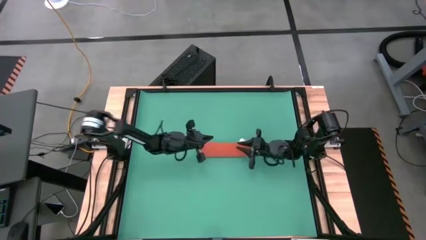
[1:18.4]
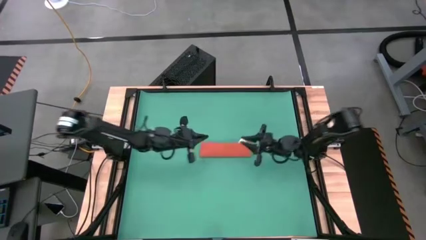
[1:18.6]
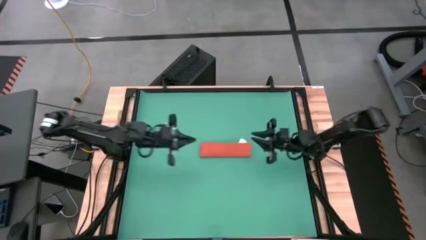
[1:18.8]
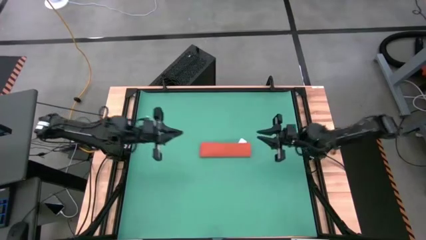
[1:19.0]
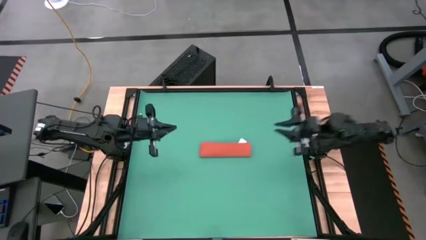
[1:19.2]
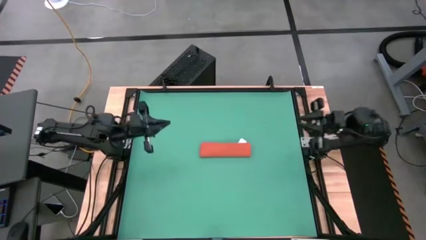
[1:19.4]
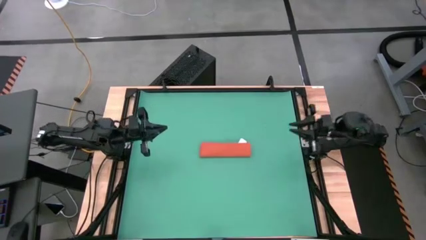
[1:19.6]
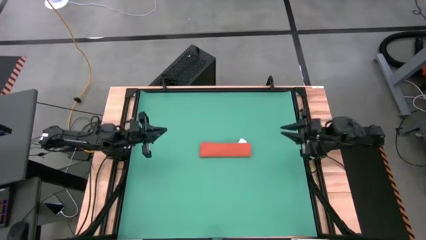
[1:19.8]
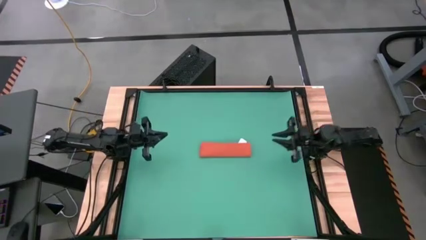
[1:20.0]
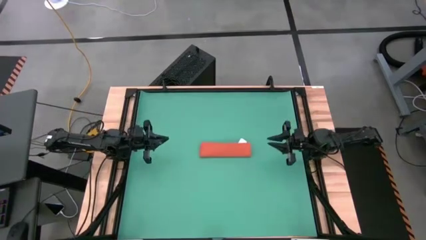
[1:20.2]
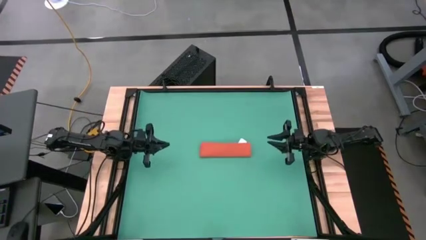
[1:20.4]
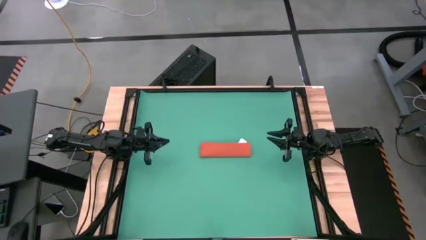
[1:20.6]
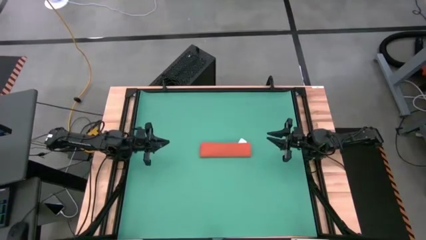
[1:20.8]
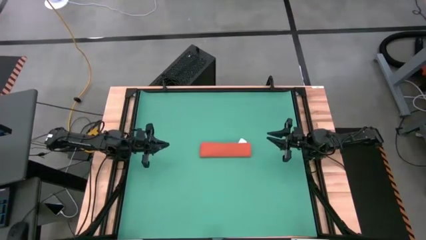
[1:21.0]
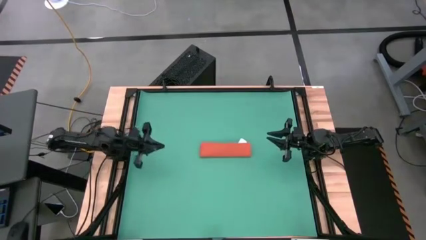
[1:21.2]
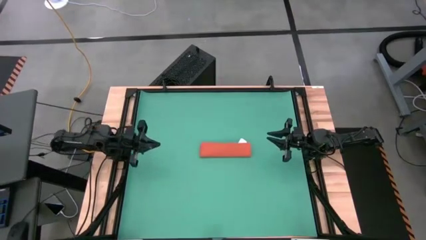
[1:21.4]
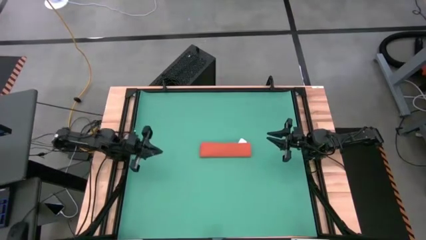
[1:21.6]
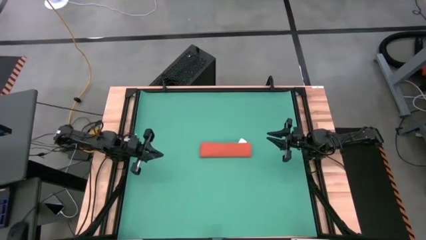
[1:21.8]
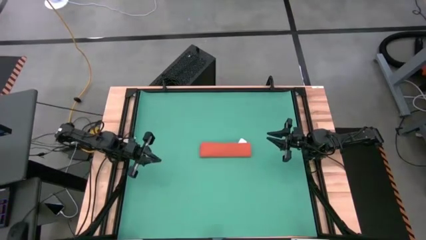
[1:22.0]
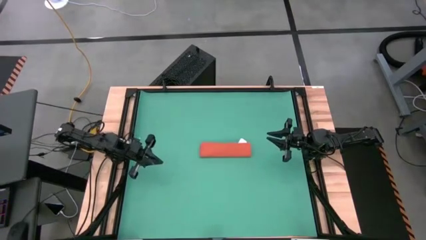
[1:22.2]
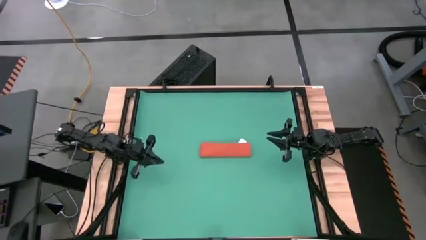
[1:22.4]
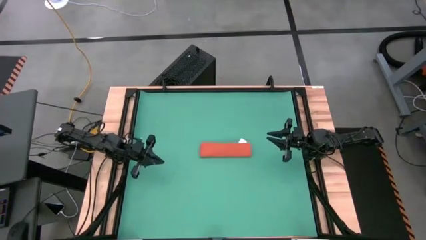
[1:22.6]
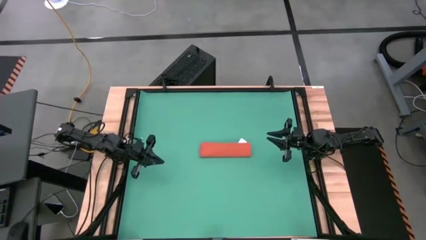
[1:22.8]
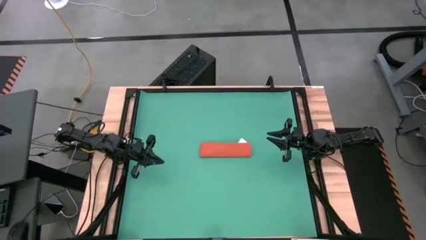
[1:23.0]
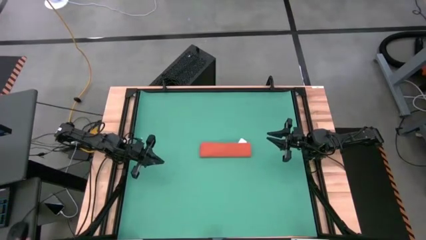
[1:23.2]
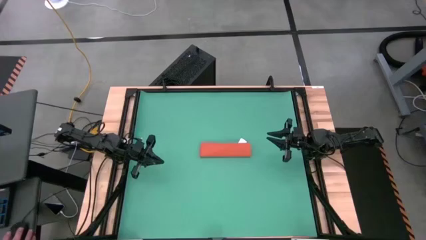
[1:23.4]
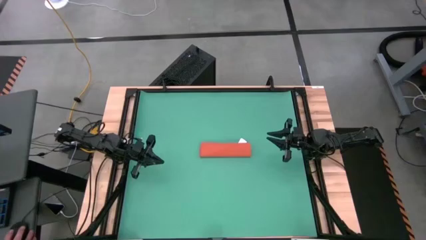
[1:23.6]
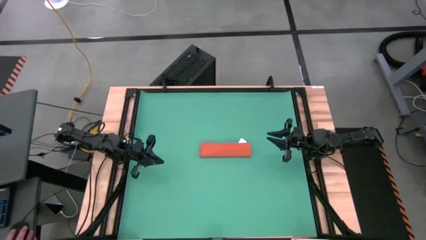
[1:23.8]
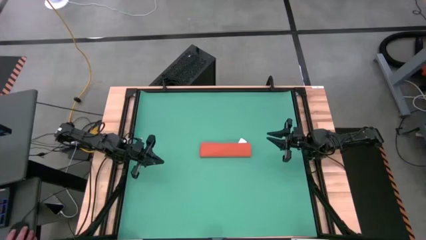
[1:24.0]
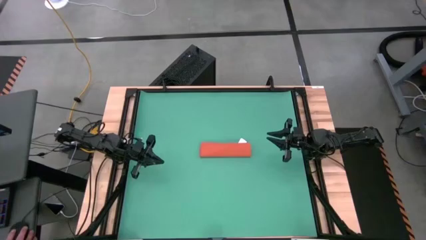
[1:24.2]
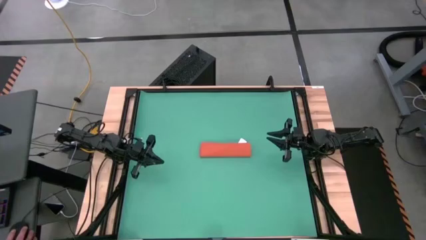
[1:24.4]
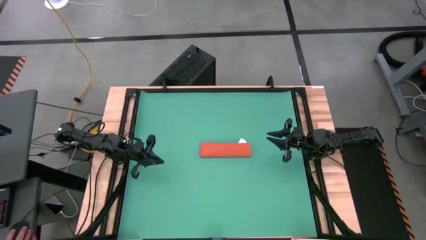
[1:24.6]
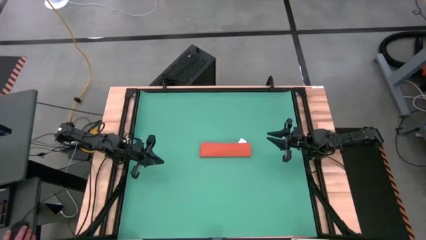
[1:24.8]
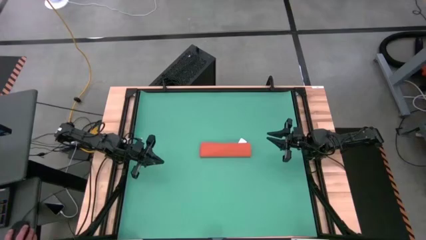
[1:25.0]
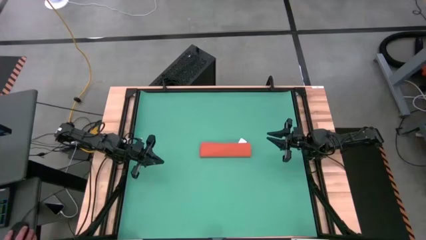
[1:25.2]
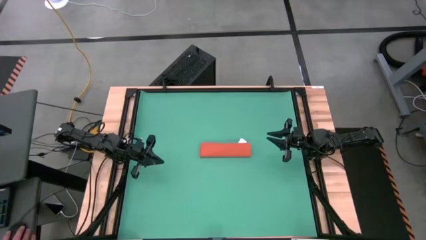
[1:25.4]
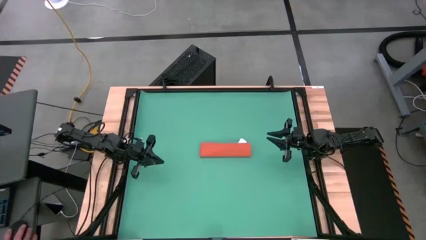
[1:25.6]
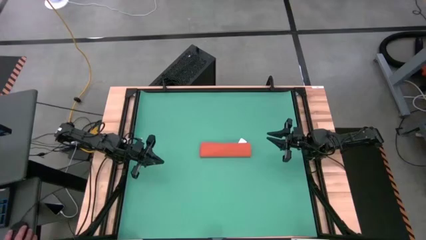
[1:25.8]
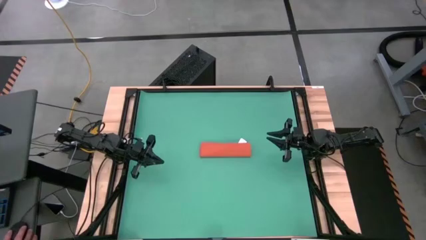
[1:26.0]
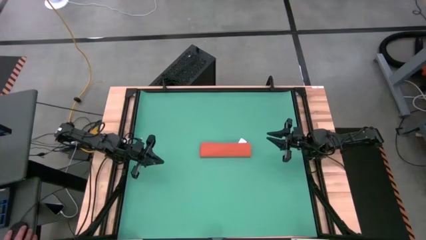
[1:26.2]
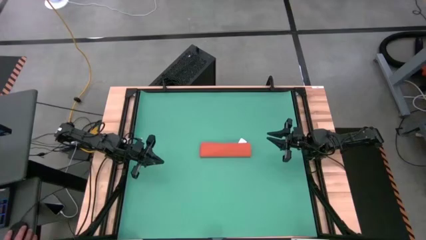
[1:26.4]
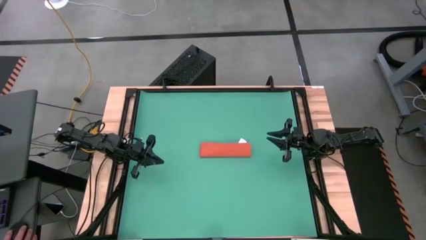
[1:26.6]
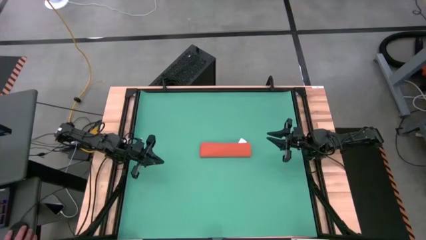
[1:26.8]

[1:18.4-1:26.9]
Task: Roll towel
Return to Home Position
